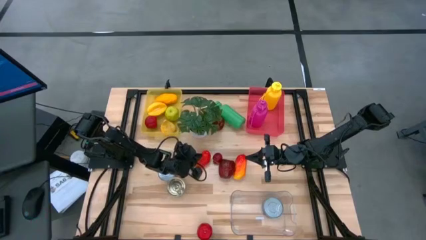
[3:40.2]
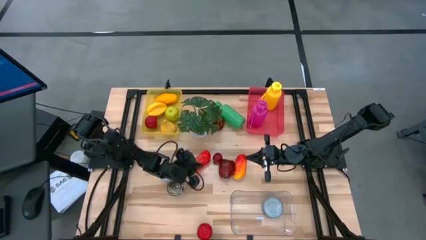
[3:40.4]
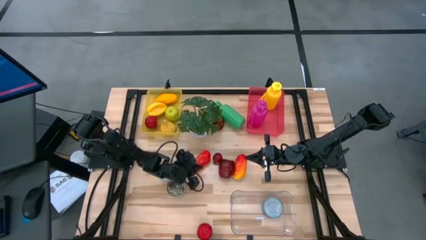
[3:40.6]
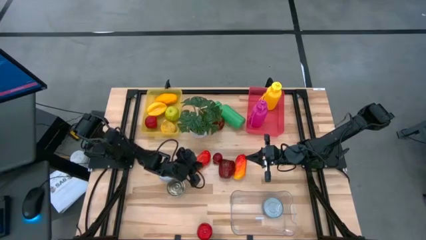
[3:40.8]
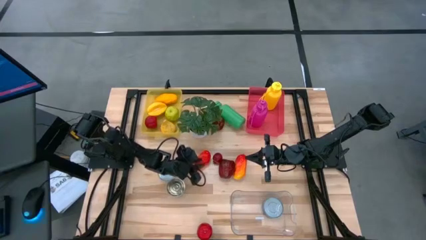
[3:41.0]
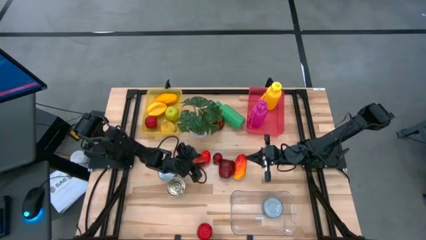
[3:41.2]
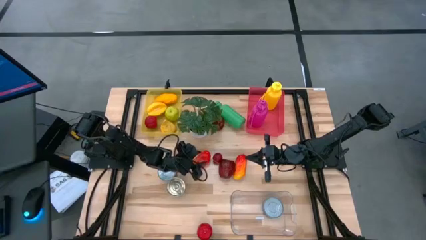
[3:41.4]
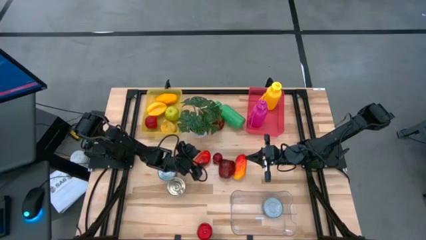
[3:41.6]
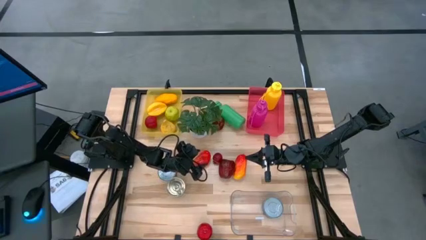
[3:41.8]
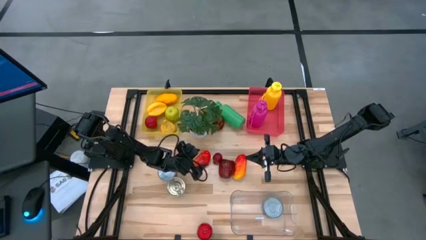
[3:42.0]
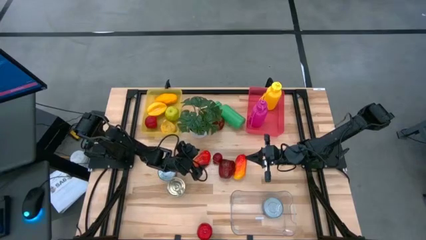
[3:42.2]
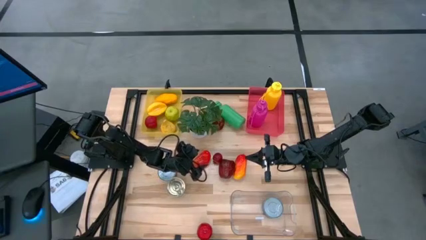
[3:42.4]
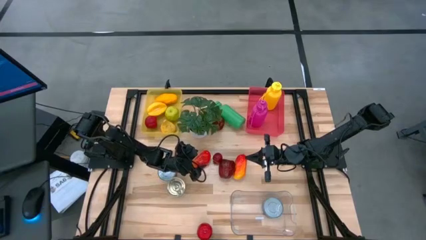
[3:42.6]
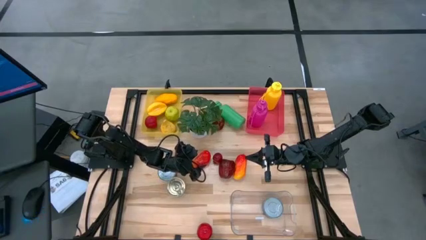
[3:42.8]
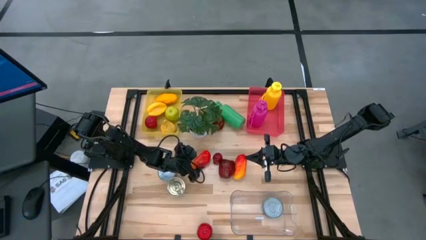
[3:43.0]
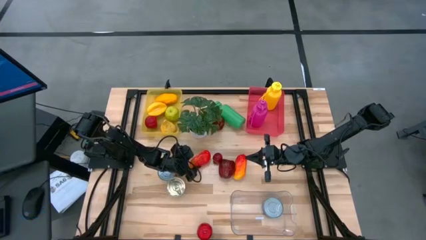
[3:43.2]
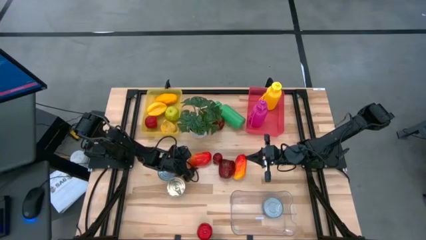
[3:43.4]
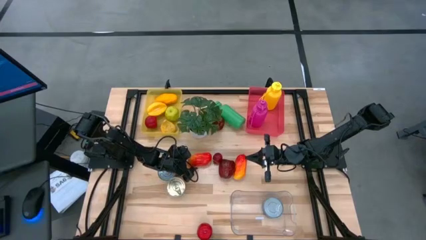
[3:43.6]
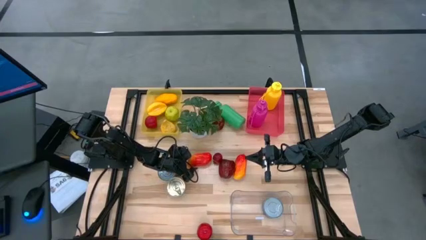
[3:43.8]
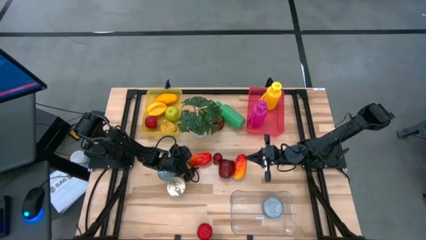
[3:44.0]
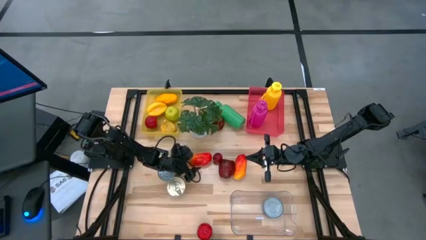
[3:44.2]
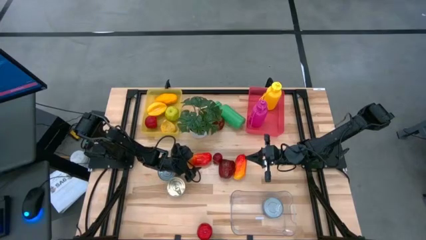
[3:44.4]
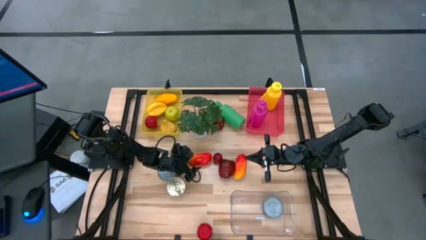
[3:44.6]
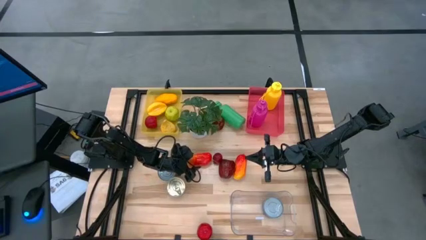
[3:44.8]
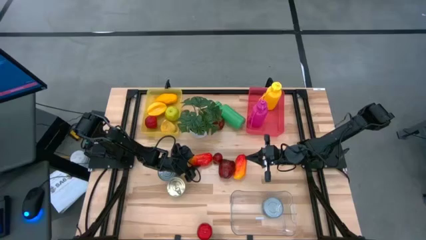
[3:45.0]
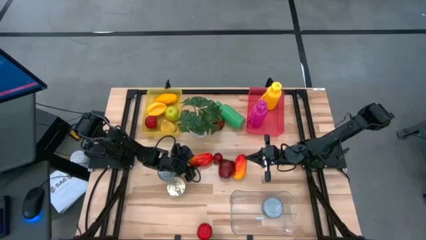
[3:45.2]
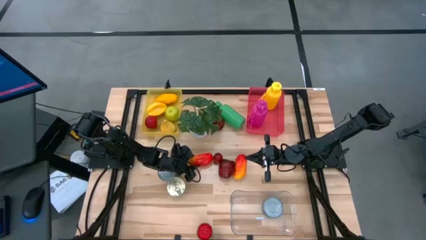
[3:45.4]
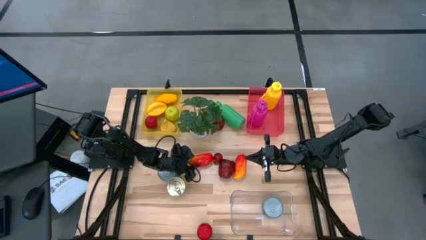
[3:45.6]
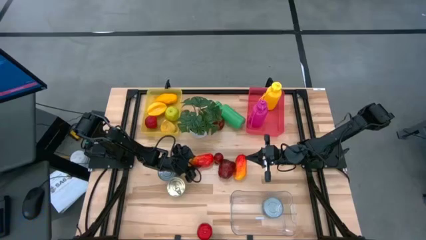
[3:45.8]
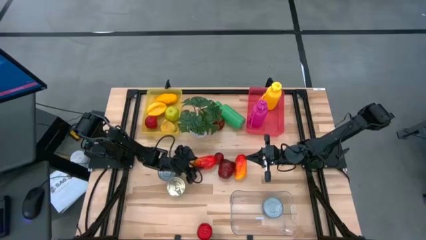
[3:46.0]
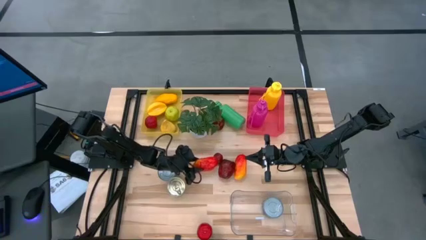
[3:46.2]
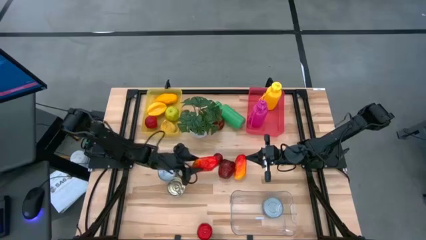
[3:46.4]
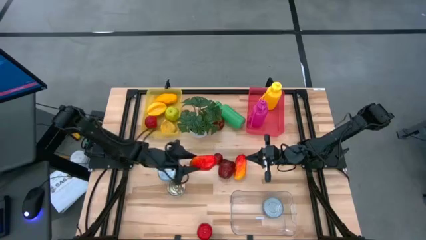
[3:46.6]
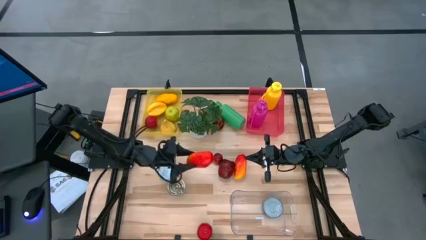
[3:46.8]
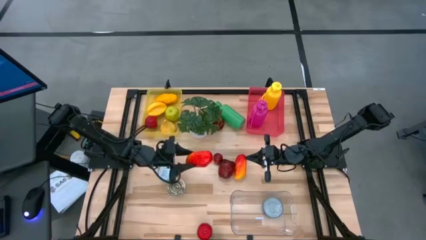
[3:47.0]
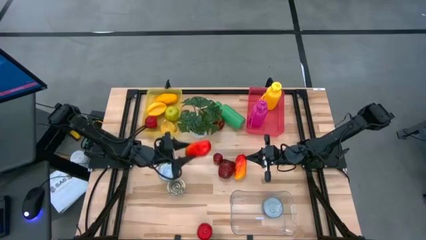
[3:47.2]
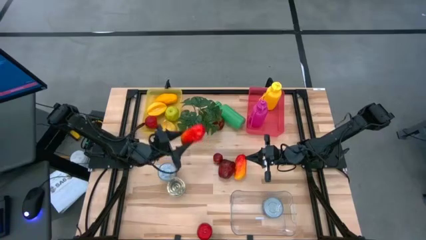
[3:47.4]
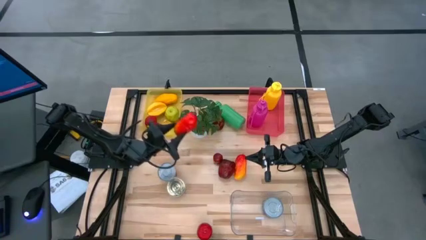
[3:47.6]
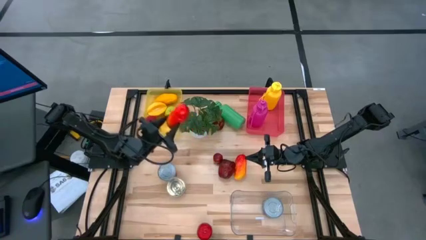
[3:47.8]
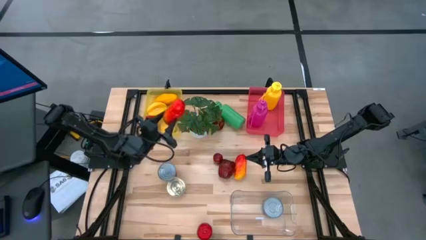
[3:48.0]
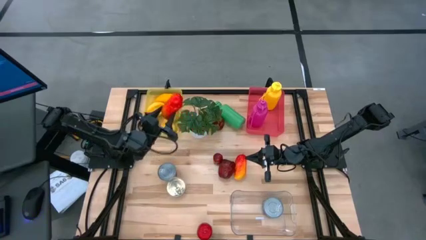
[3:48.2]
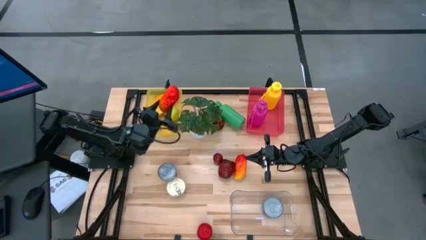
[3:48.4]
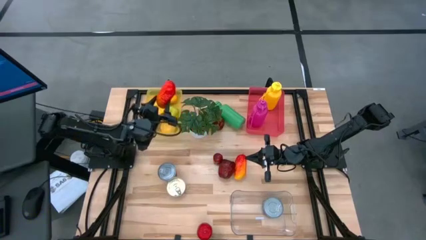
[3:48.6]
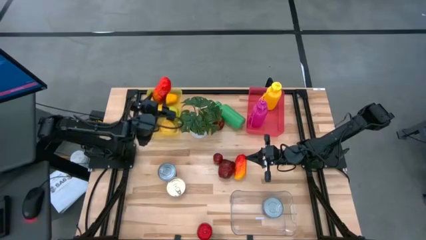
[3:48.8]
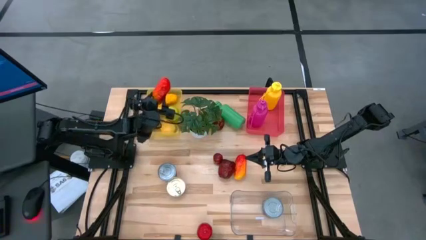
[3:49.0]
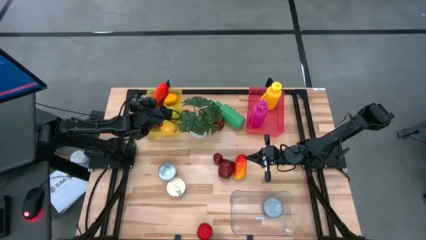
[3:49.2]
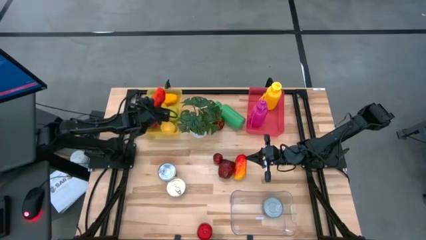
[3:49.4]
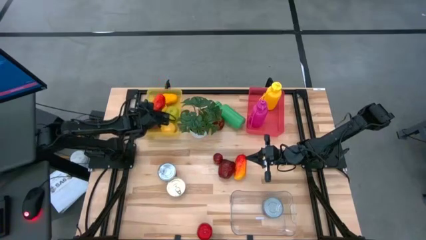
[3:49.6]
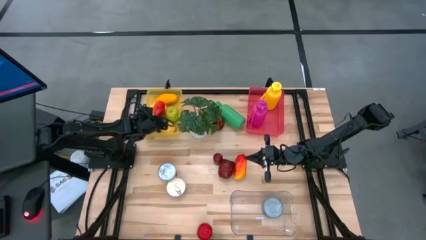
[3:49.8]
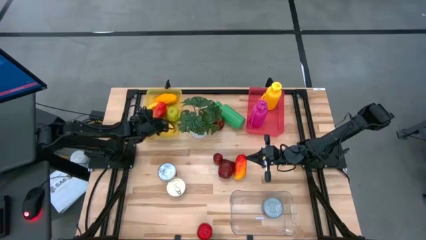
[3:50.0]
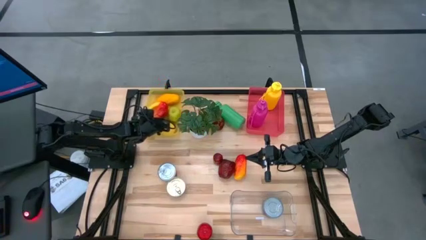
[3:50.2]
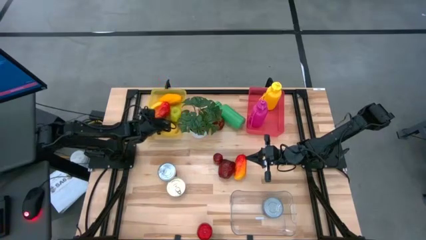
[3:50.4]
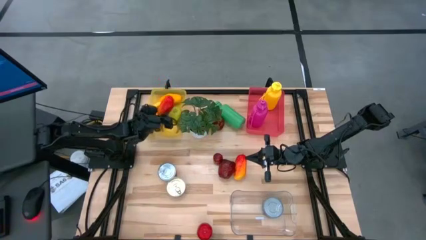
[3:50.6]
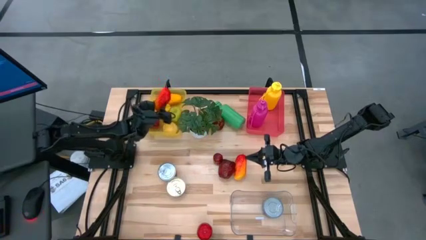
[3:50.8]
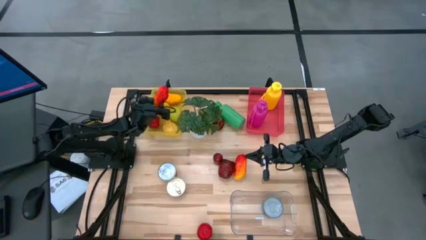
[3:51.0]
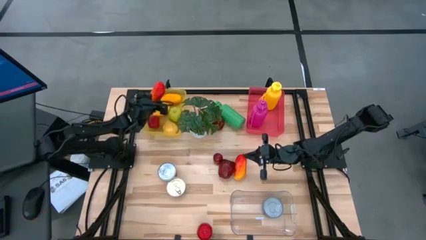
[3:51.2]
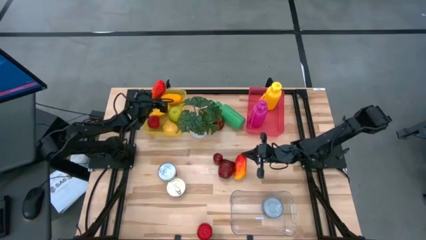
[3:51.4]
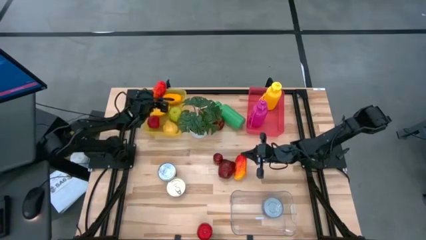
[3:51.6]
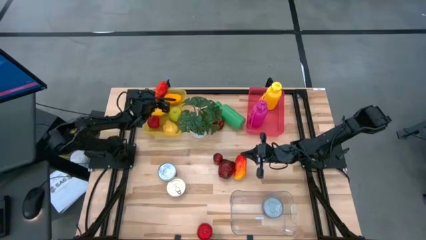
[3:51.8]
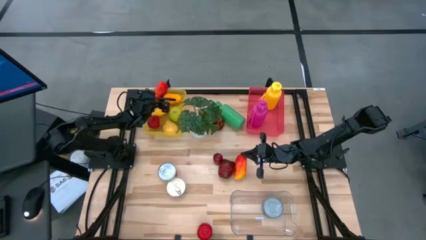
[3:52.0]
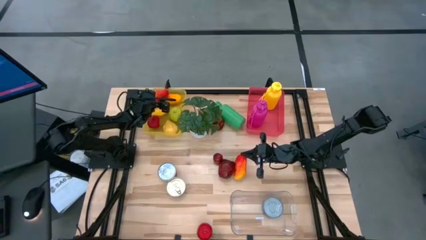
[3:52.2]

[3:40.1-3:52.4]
Task: Pick & Place Food Item
Put the orange mango into the yellow bin
